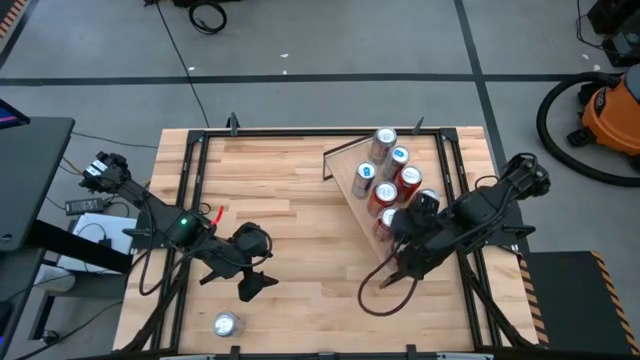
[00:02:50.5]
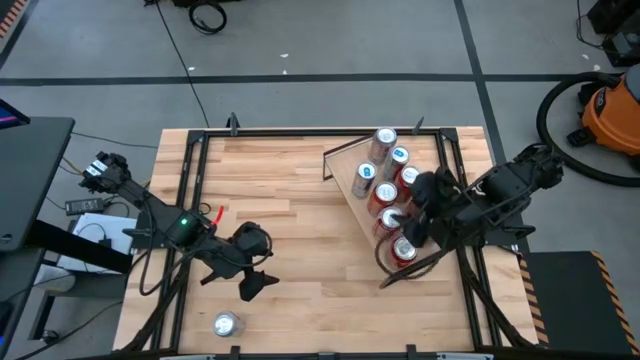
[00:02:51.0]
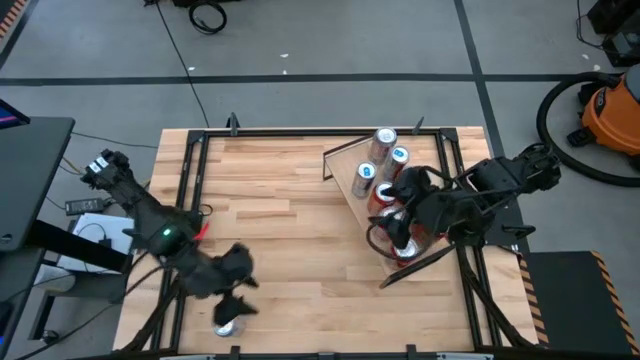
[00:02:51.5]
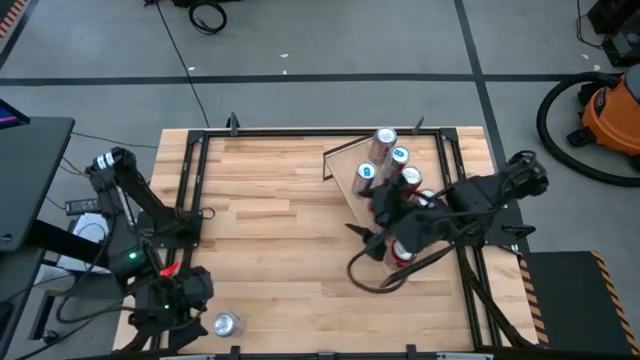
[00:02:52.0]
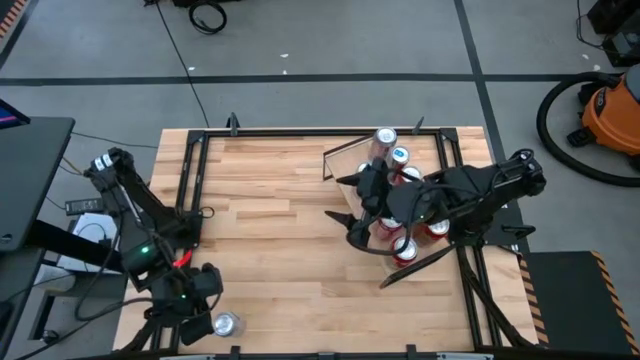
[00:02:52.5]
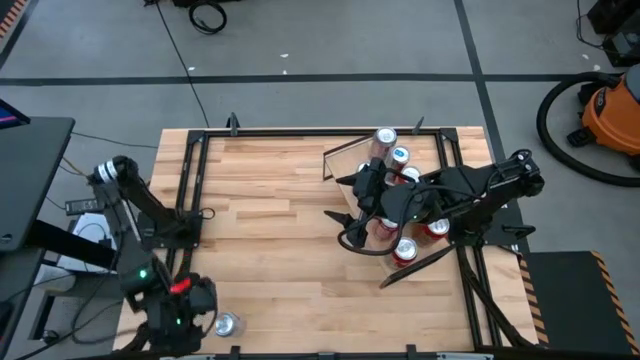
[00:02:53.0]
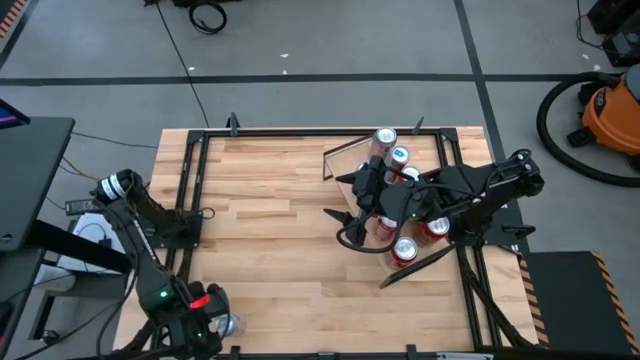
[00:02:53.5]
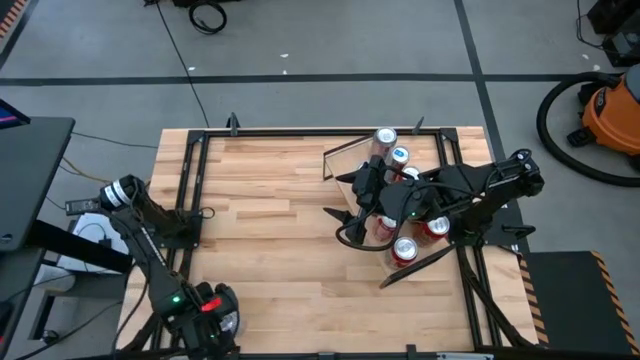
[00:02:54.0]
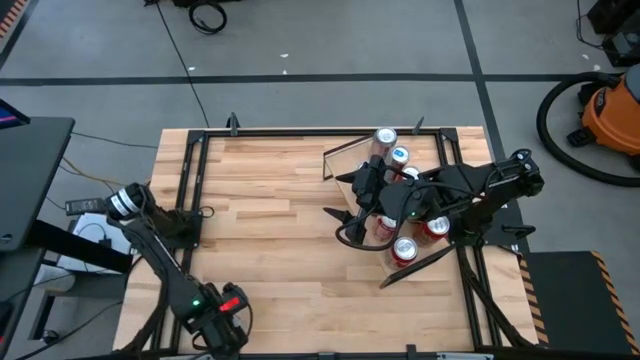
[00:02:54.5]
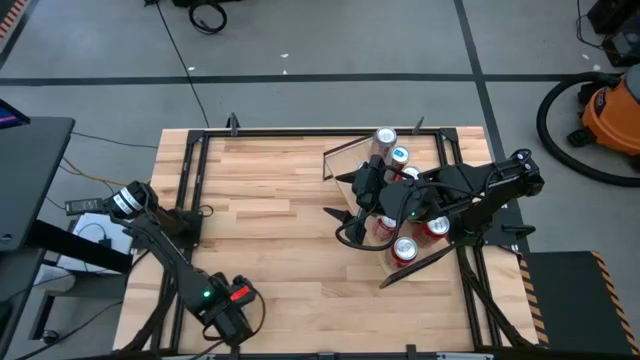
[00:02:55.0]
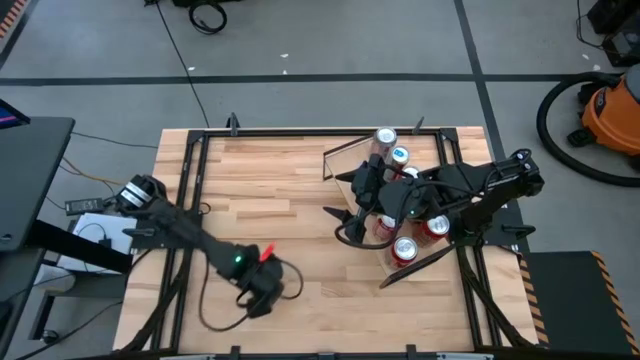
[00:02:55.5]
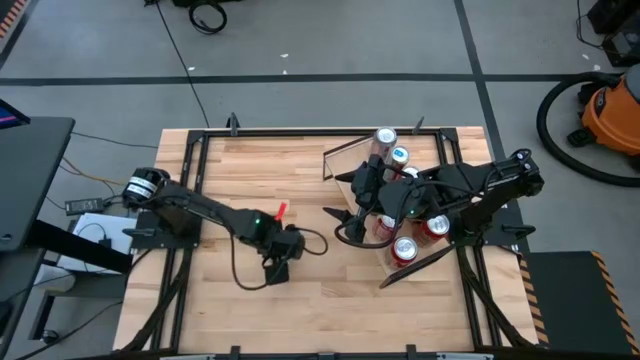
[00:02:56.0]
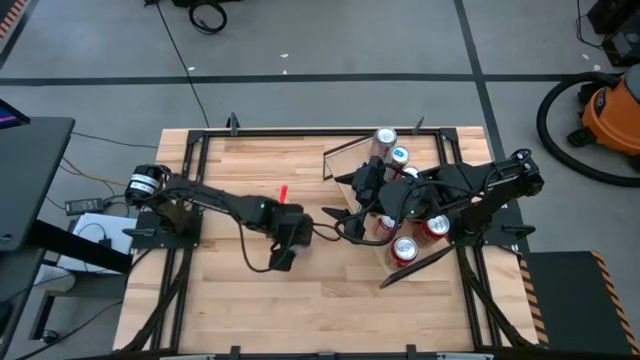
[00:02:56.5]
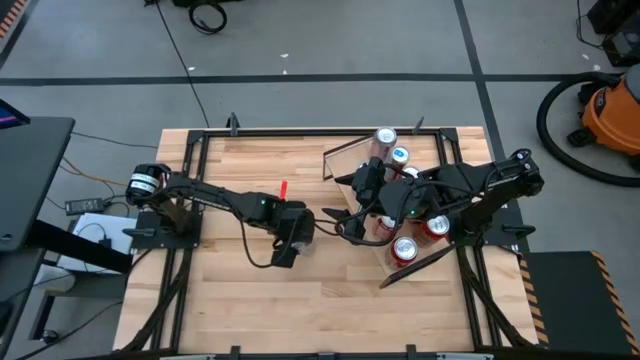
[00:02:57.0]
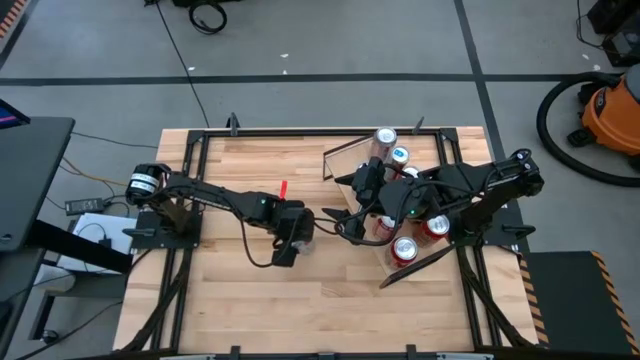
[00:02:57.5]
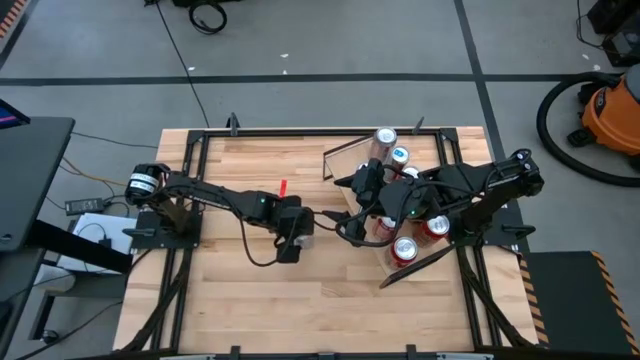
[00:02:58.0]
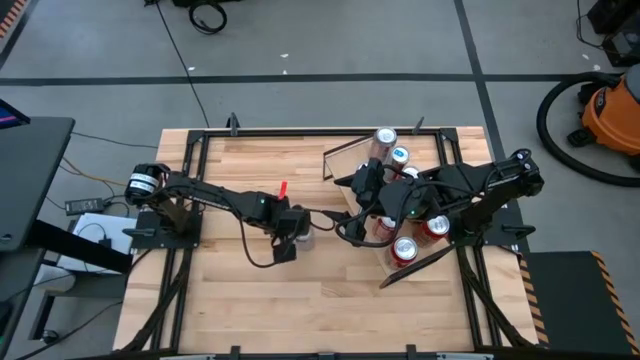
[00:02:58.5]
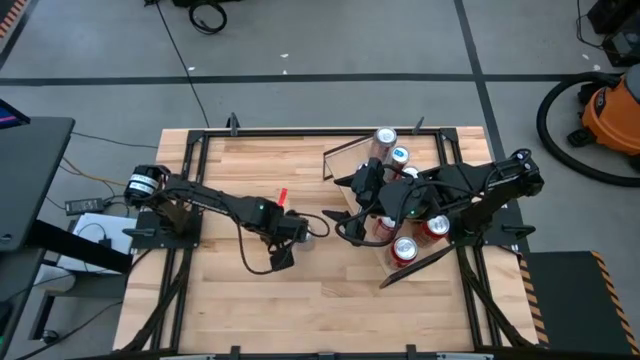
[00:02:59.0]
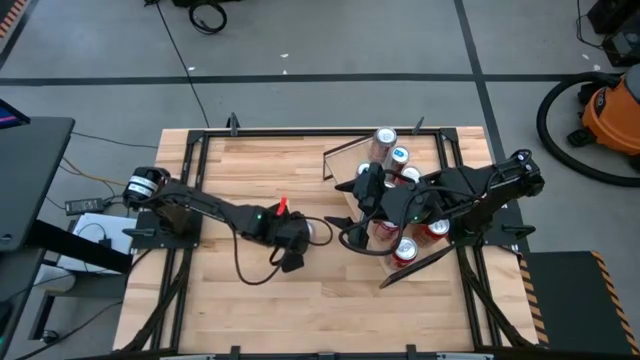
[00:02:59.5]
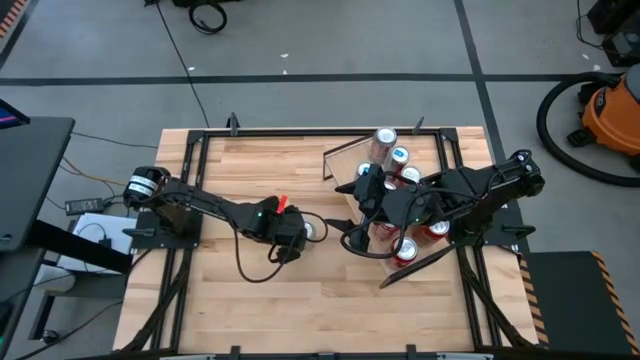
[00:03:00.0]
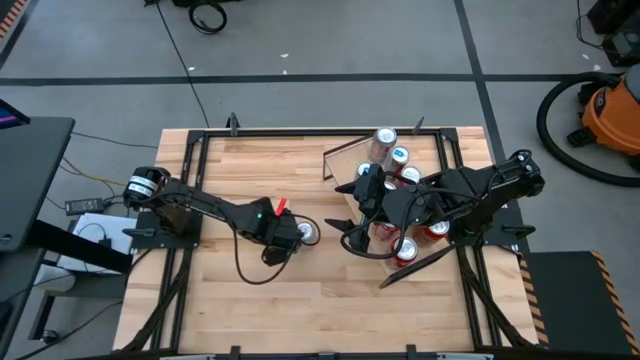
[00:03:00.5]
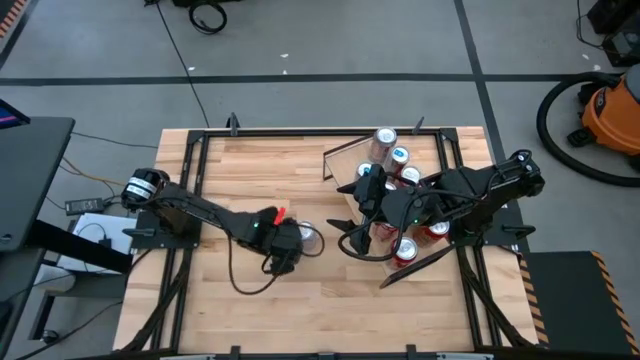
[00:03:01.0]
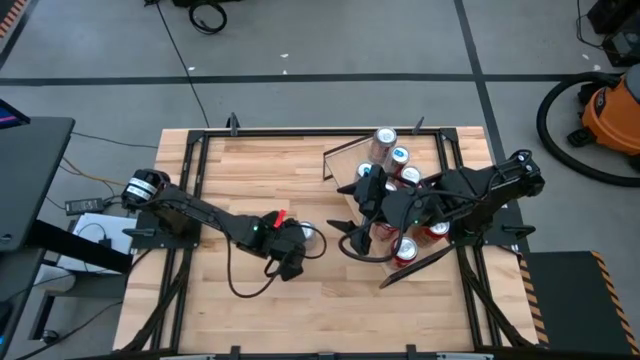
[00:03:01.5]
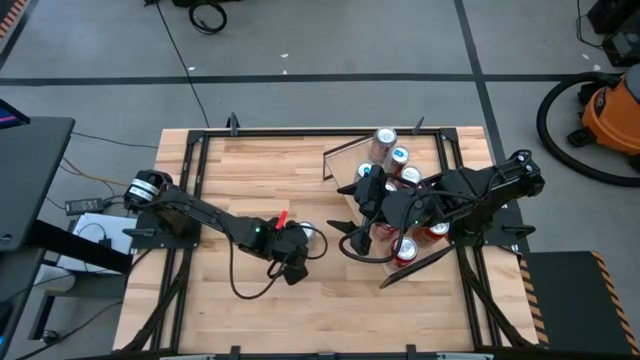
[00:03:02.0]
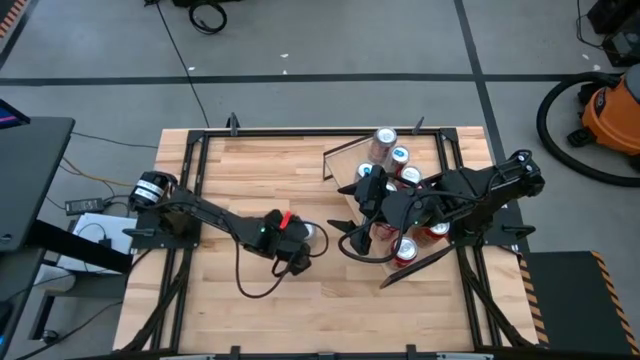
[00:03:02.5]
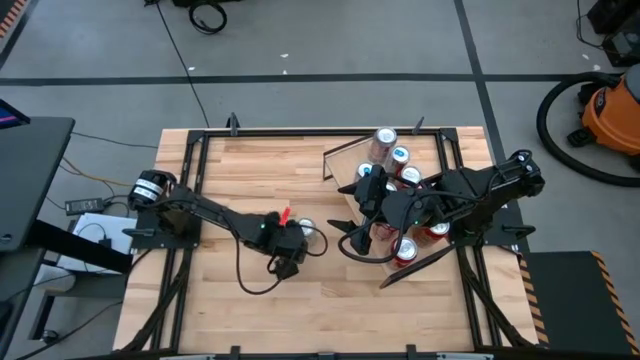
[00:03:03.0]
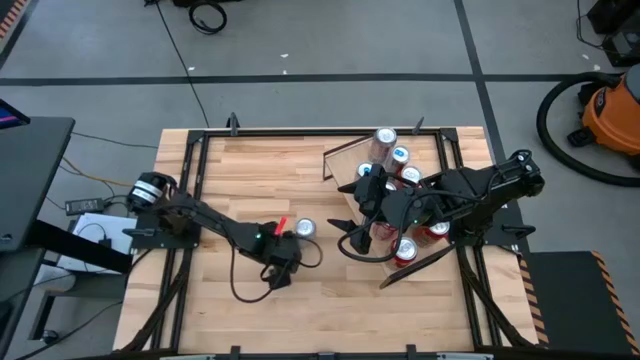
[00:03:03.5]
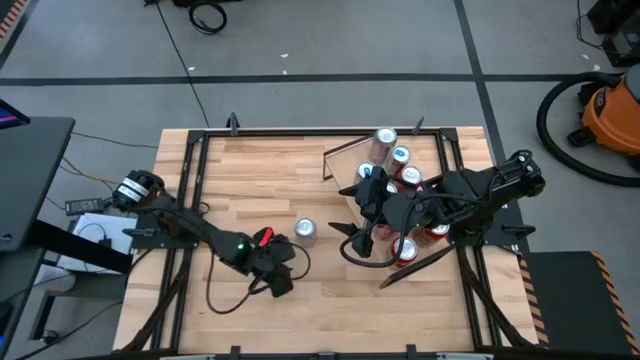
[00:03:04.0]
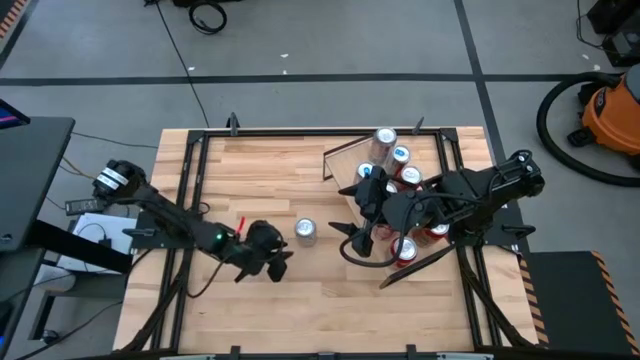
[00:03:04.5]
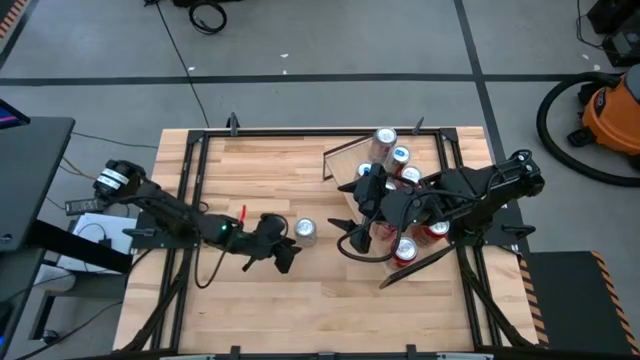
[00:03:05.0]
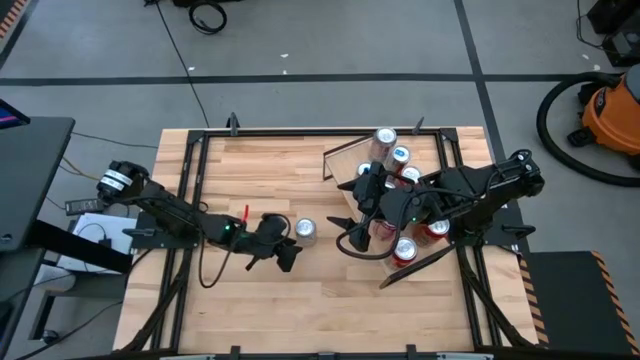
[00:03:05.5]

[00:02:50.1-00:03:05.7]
Task: Place canned beverage on shelf
Put the silver soda can on the shelf aligned with the other silver can

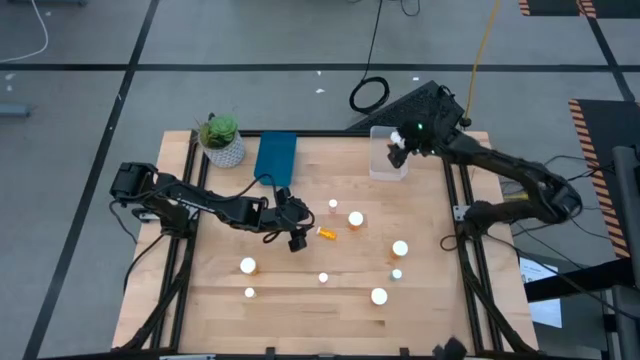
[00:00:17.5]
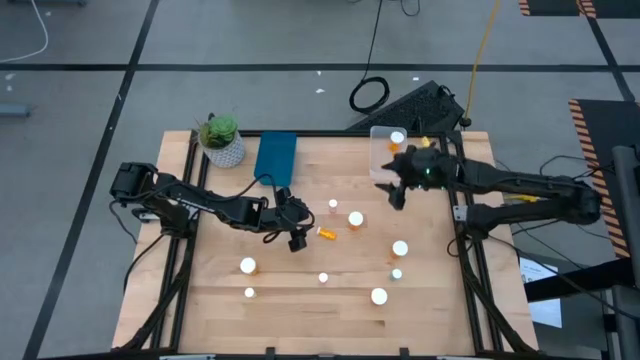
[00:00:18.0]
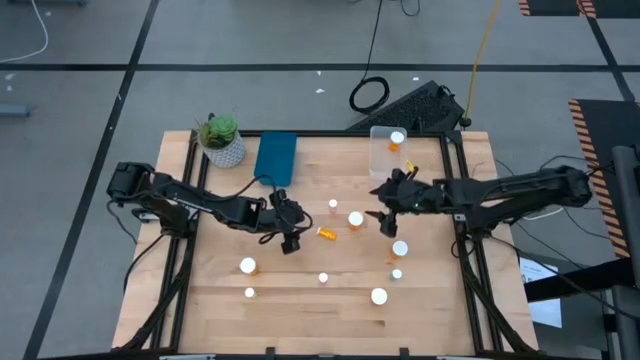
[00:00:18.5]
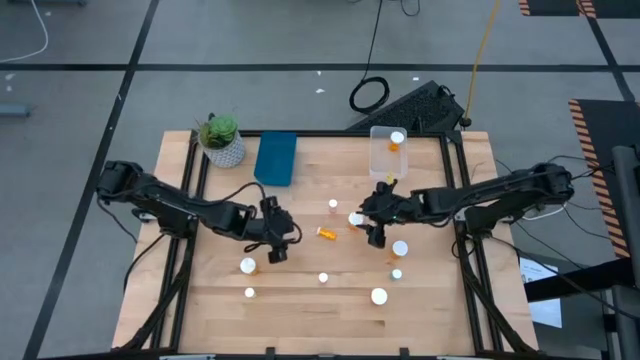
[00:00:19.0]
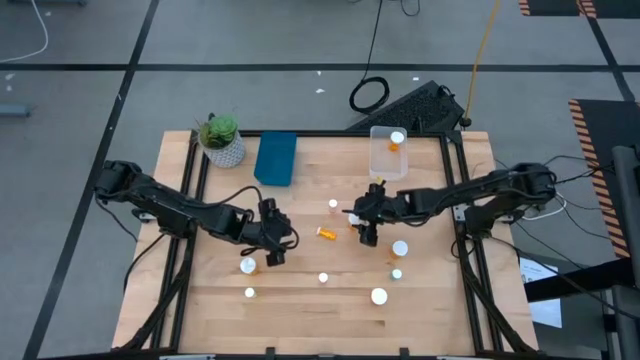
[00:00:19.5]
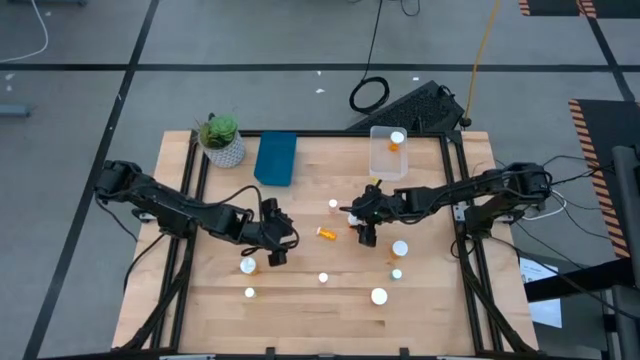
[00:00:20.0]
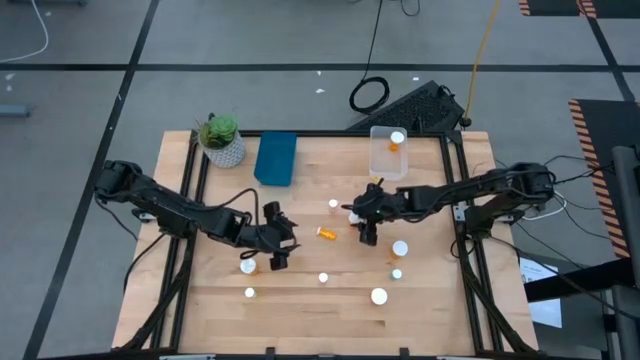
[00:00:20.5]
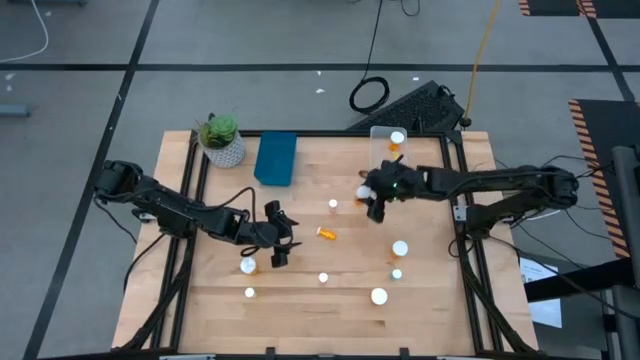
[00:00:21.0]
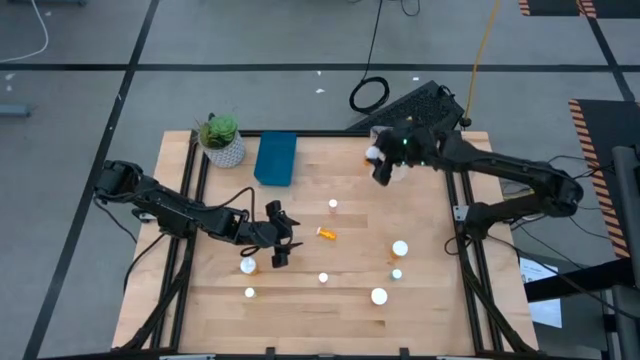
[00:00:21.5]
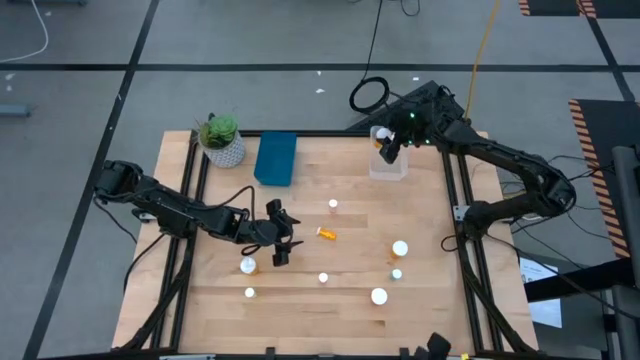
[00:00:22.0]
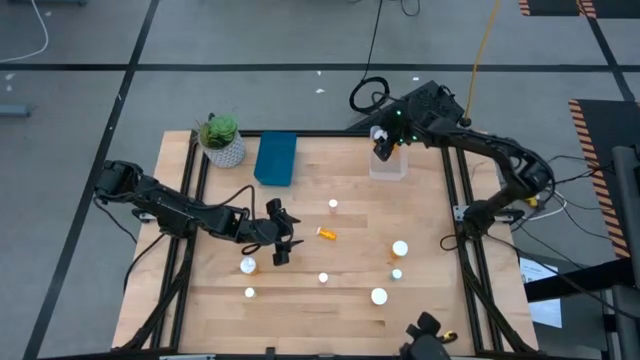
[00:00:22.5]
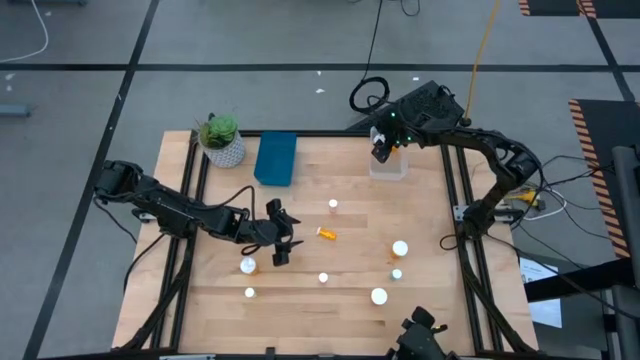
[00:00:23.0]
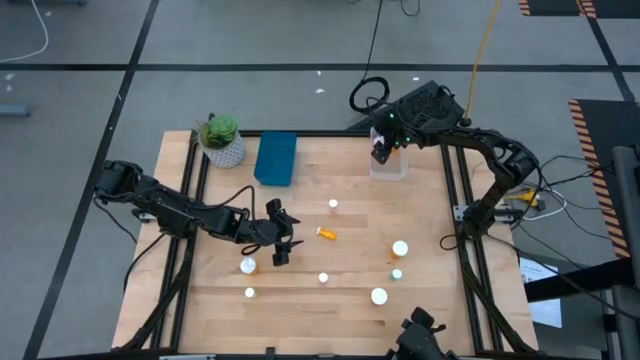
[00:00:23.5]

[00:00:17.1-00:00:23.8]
Task: Pick and place medicine bottles into bin by pill shape (circle, oval)
Put the orange bottled capsules into the transparent bin
